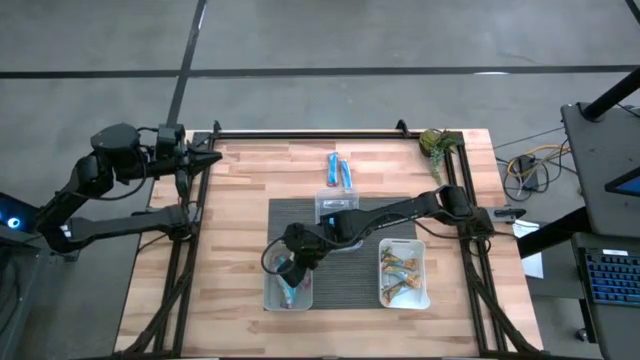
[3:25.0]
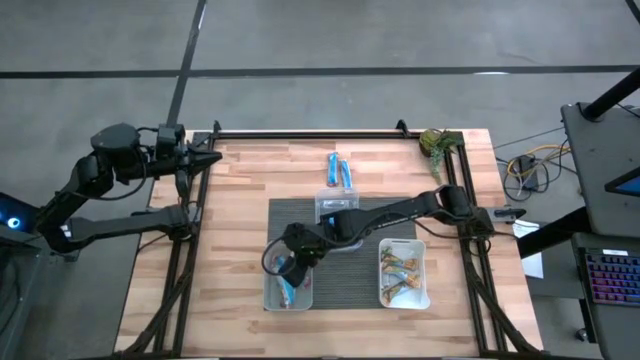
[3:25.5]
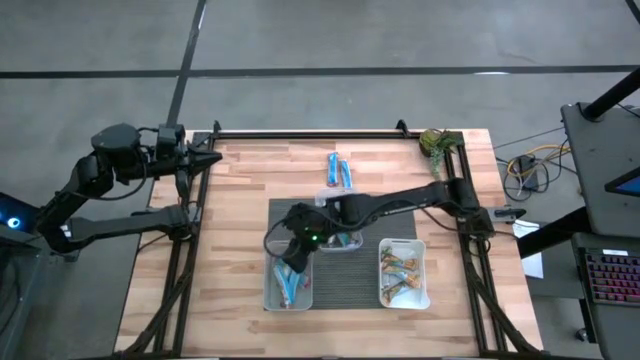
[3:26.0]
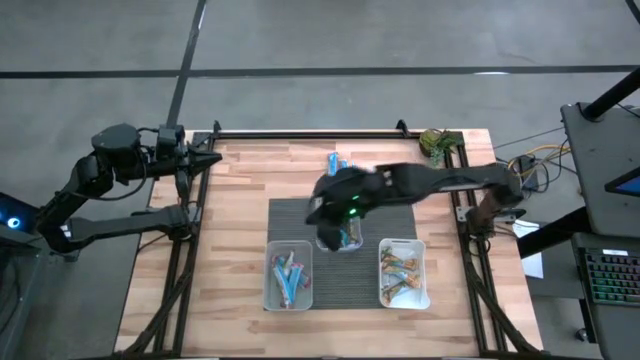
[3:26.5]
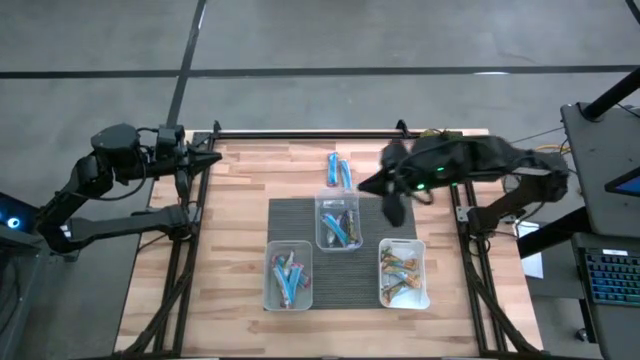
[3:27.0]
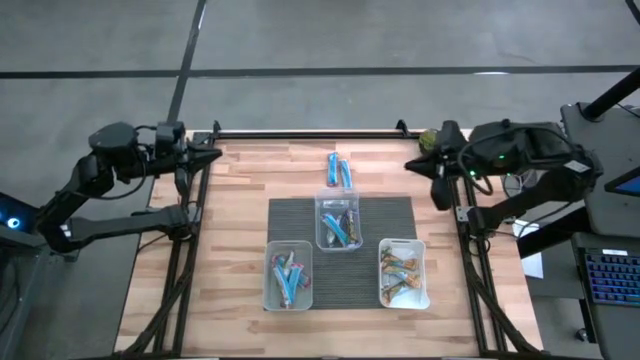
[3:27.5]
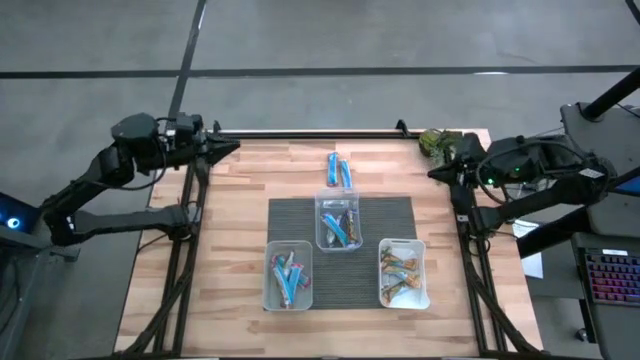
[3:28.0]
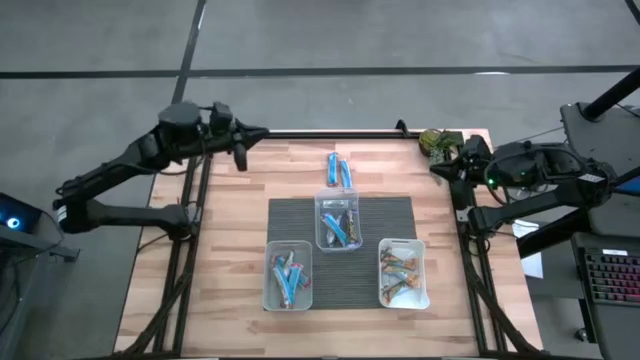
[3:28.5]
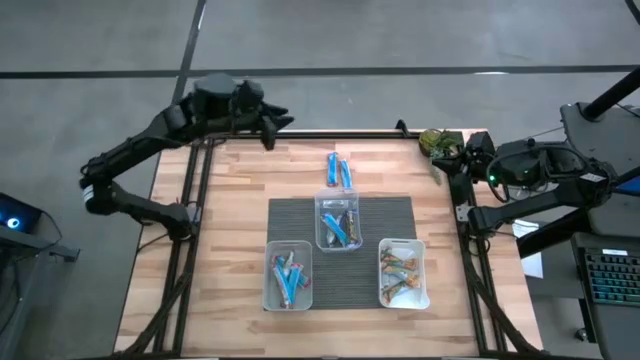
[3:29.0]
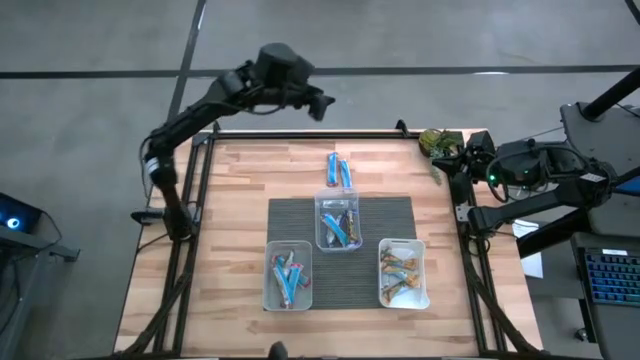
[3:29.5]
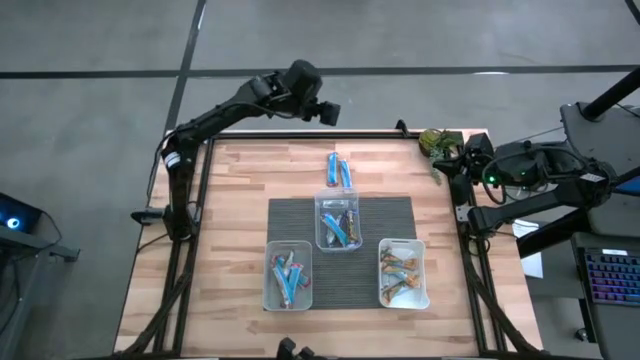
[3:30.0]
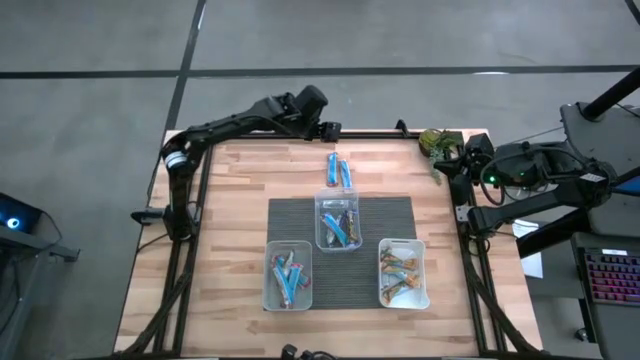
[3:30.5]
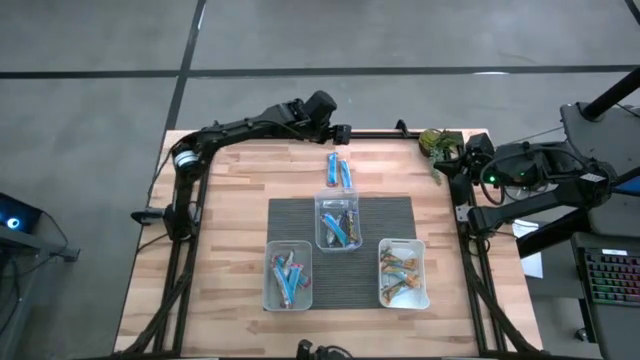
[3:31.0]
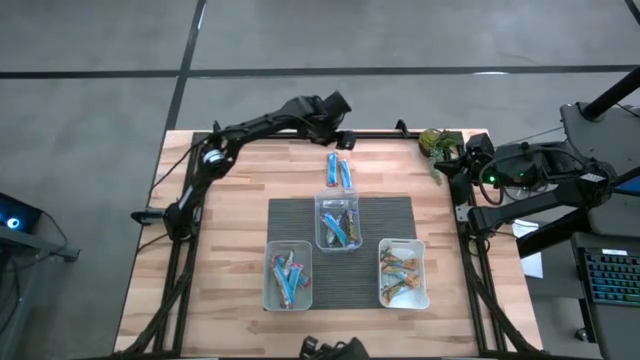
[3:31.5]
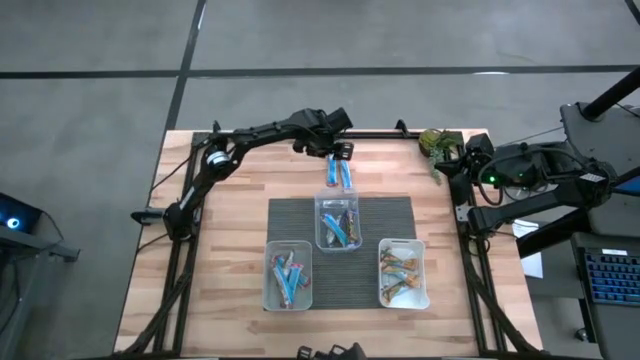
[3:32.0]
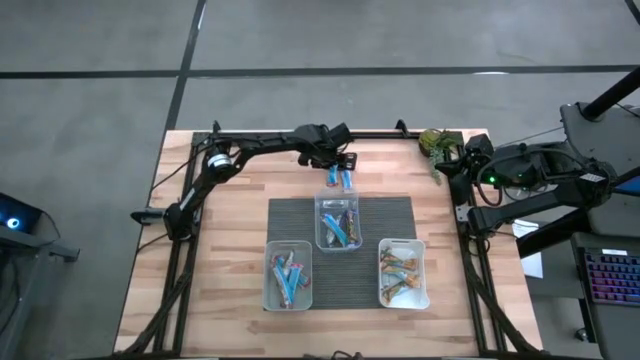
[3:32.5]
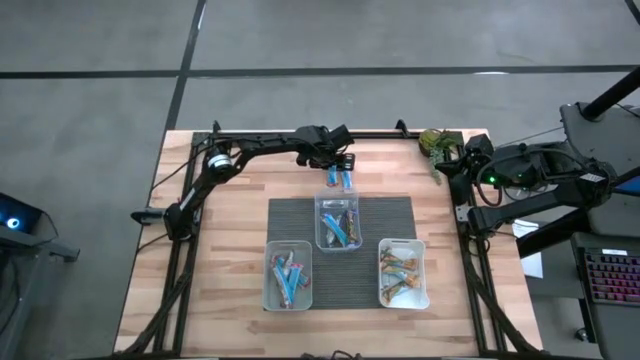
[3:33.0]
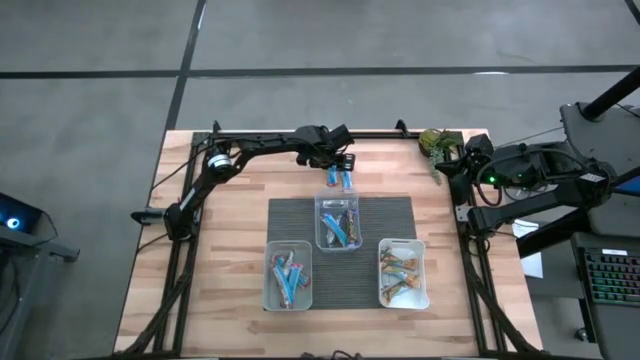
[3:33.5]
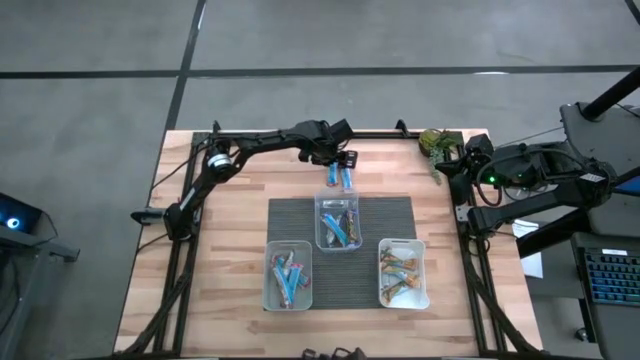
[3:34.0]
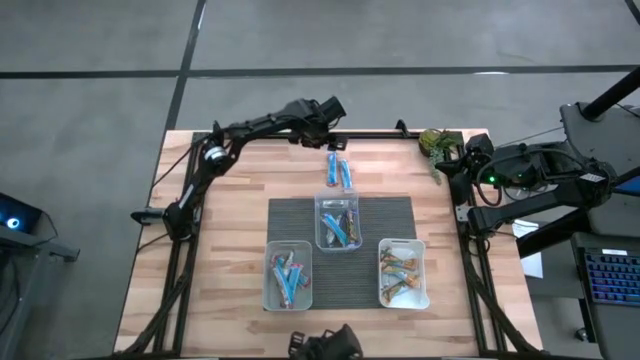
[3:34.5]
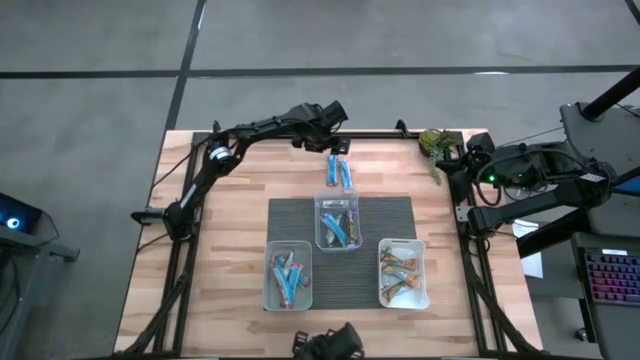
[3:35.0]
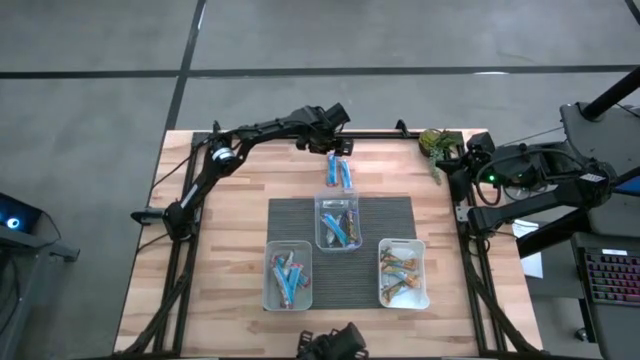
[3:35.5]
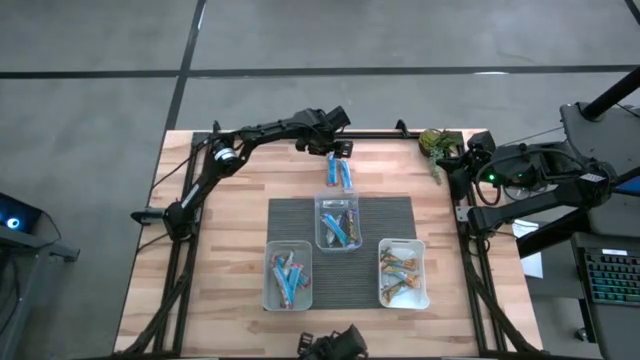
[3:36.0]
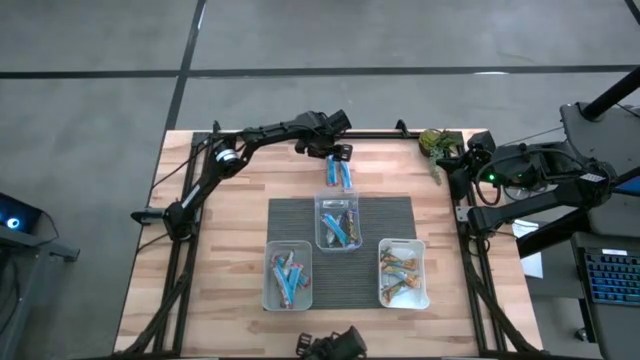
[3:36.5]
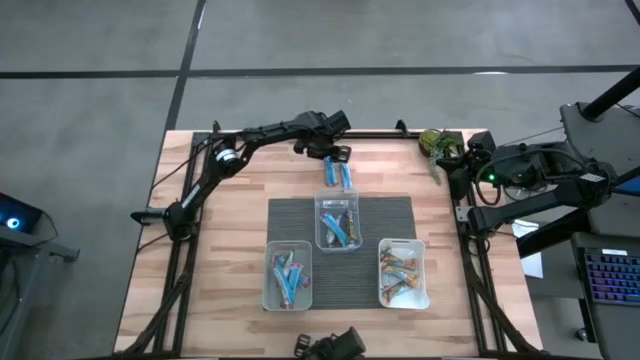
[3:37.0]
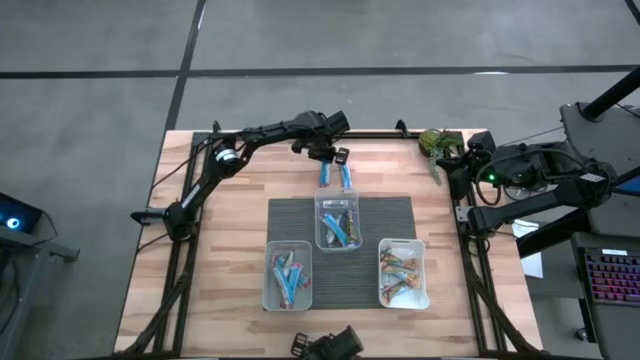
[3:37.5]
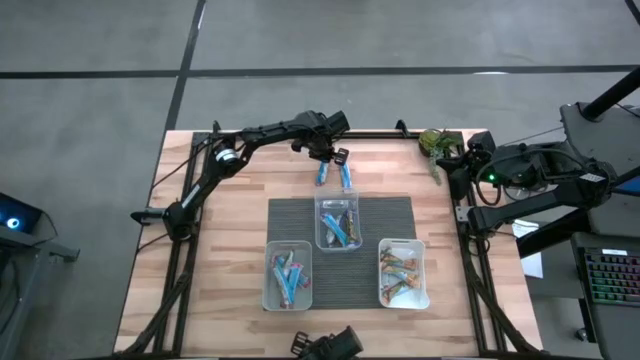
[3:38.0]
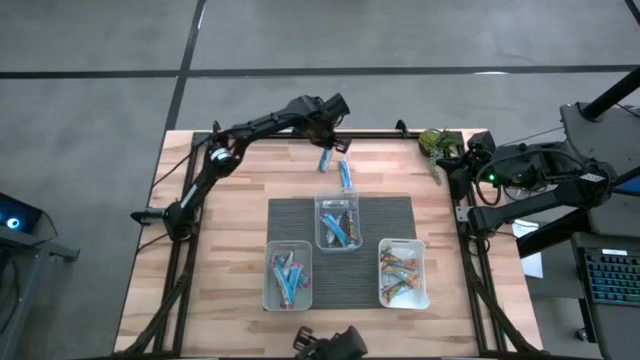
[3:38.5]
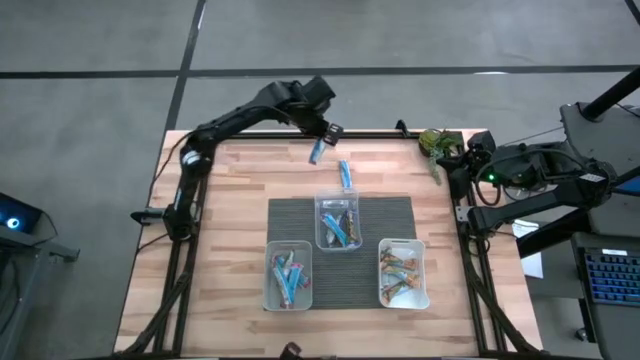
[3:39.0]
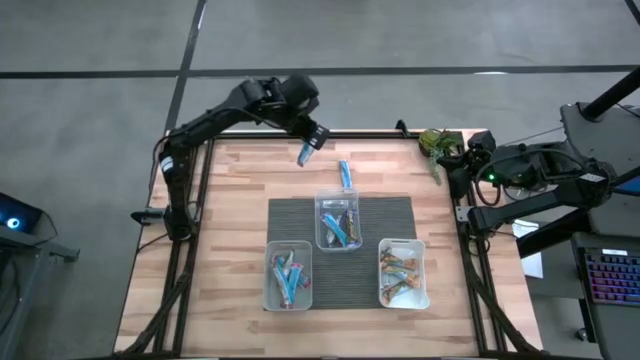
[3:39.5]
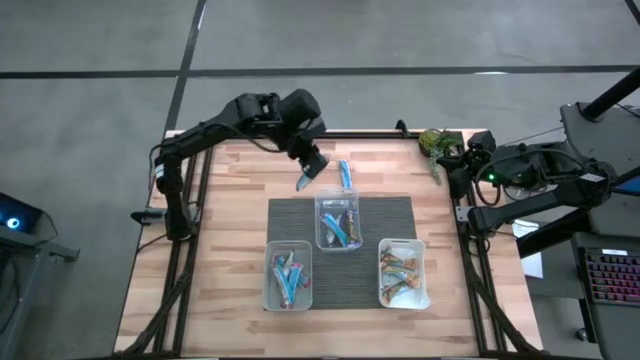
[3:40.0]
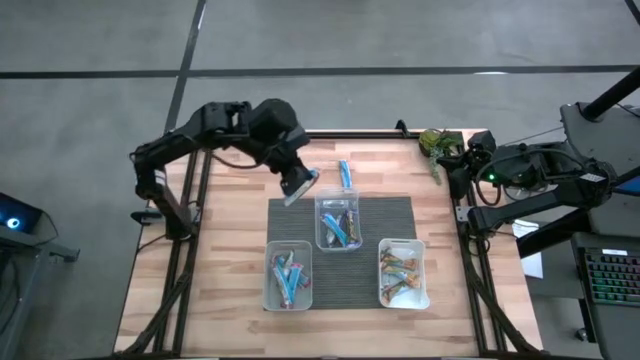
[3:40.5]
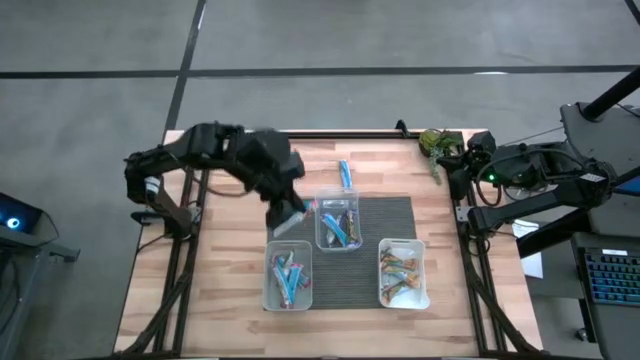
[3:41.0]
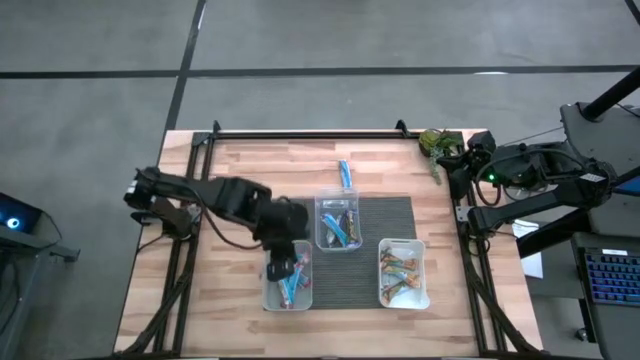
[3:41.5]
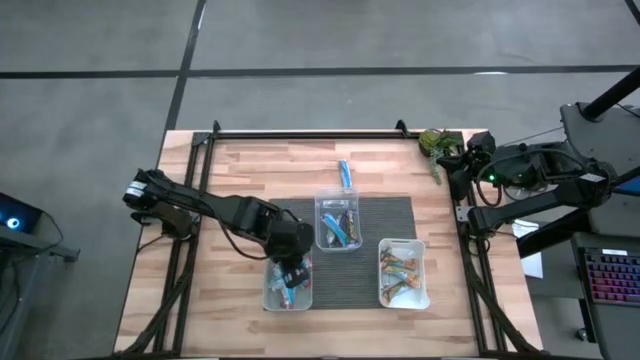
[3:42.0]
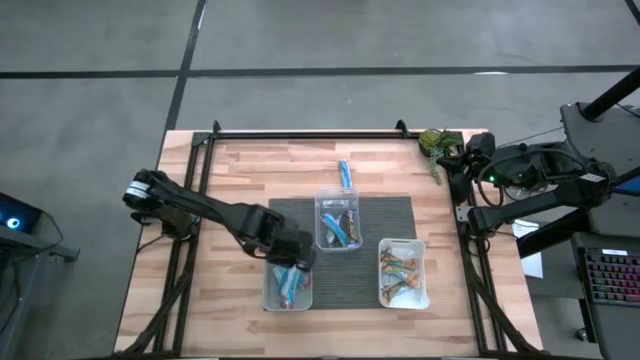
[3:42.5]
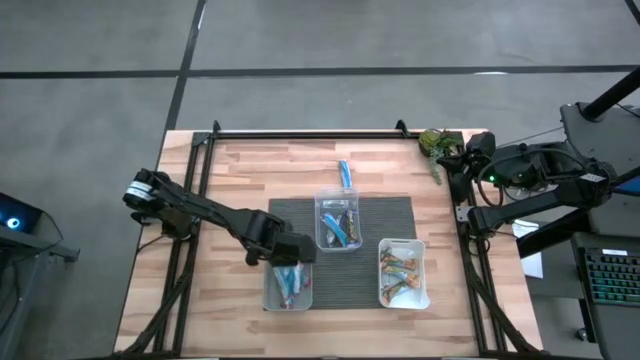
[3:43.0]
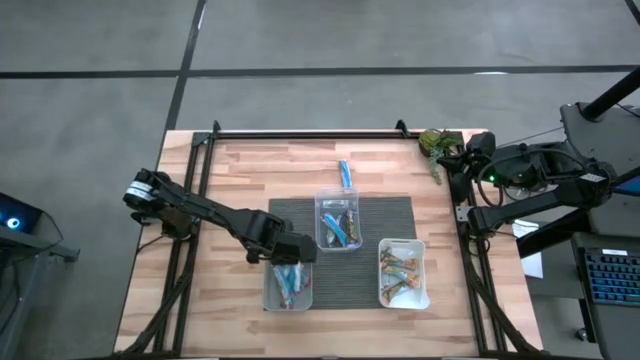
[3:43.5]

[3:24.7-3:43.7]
Task: Pick and place Granola Bars by type
Put the red granola bar into the gray bin

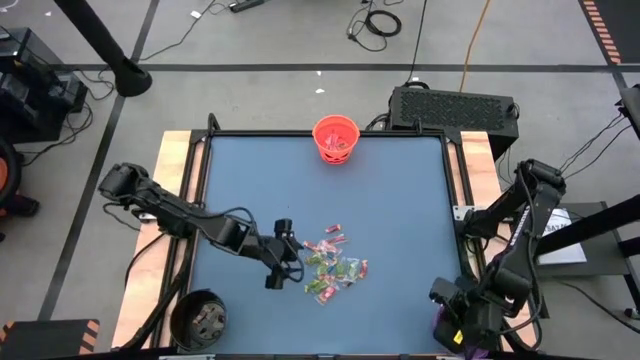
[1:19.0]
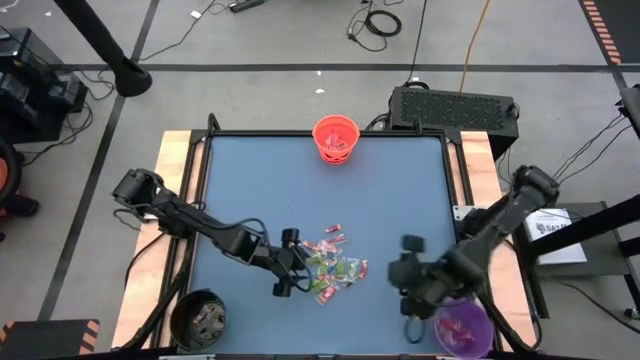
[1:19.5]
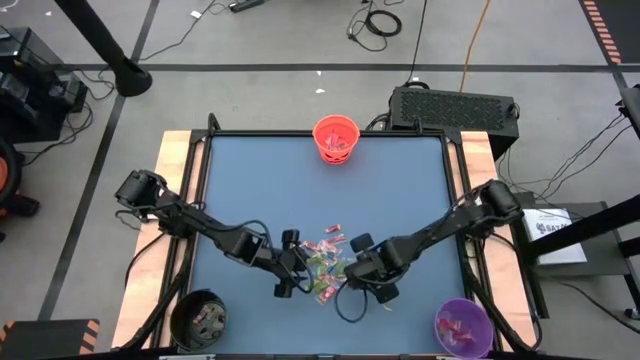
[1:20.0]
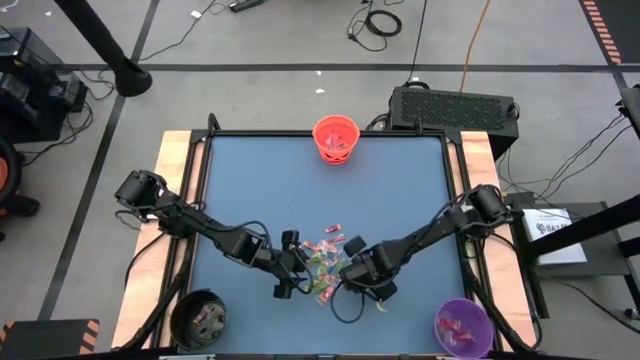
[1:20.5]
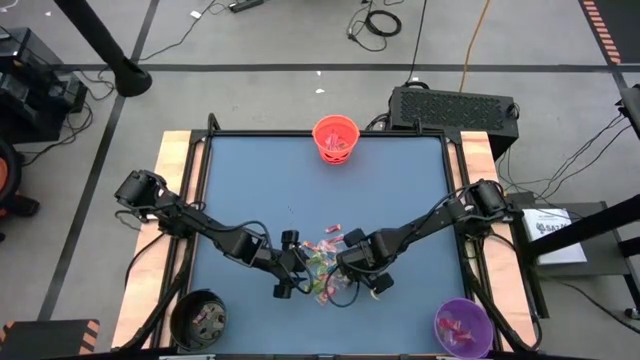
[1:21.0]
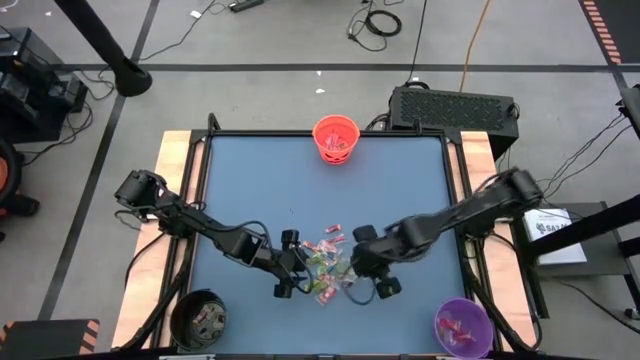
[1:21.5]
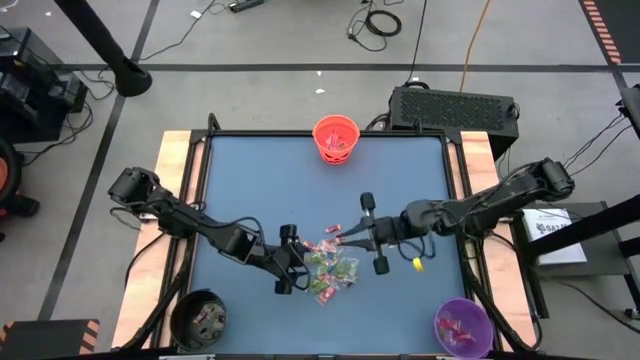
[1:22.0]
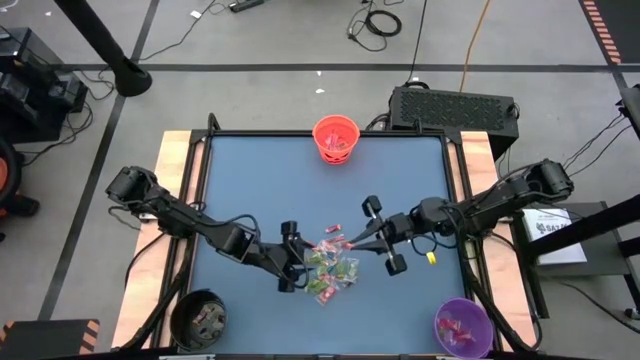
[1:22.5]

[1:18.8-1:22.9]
Task: Sort candy by brand, put in halloween buckets
Put the orange candy into the black bucket
